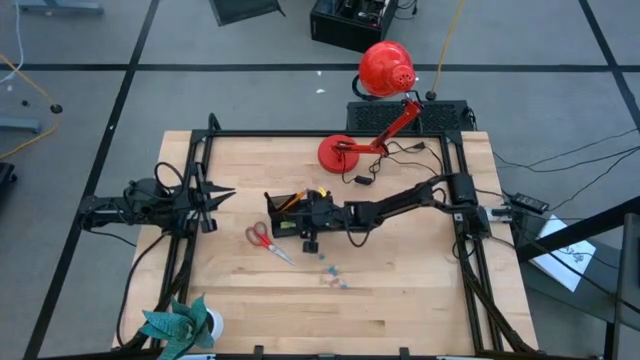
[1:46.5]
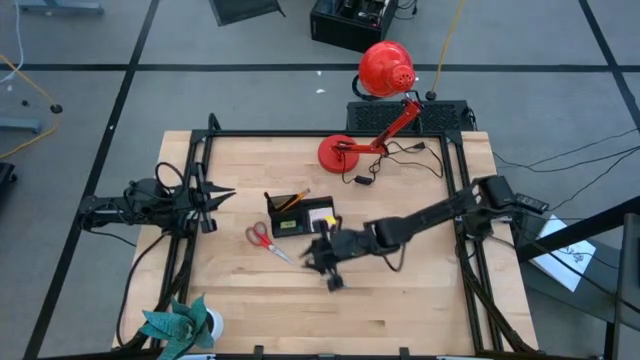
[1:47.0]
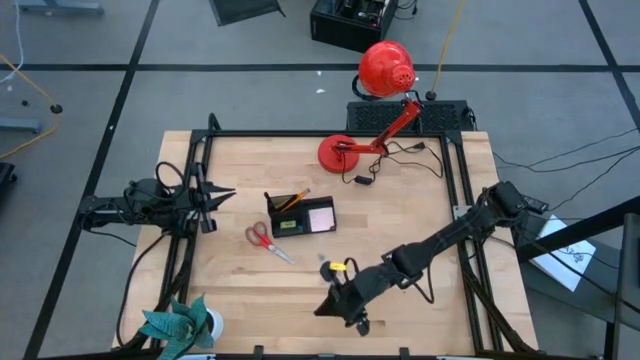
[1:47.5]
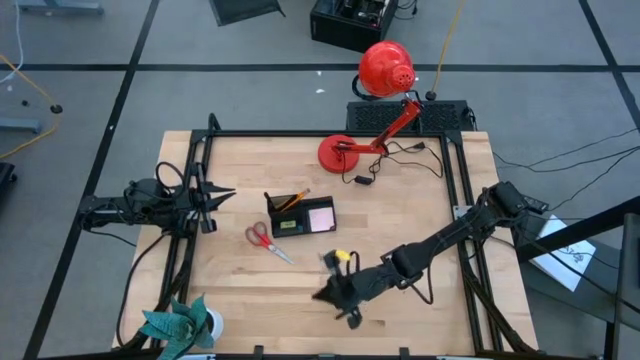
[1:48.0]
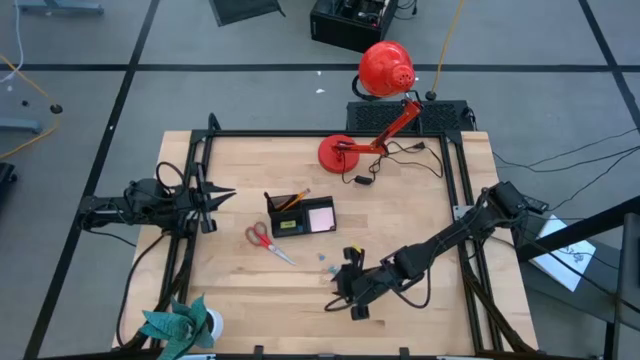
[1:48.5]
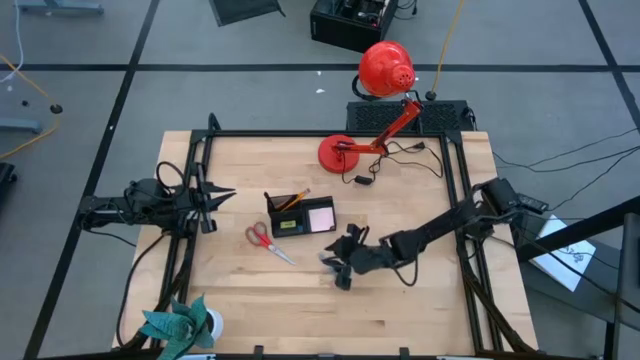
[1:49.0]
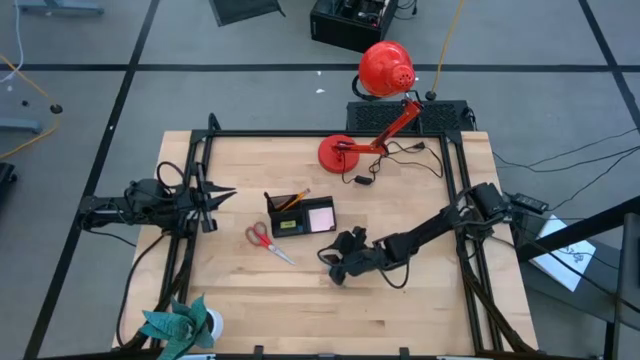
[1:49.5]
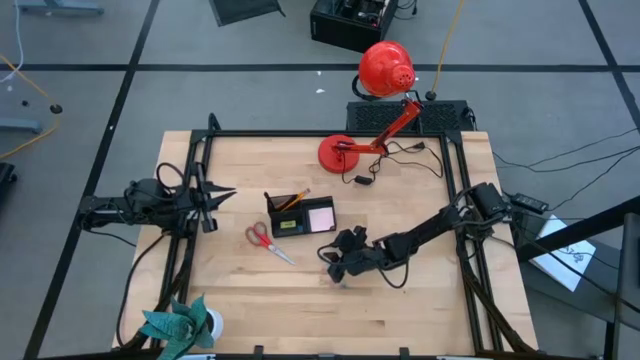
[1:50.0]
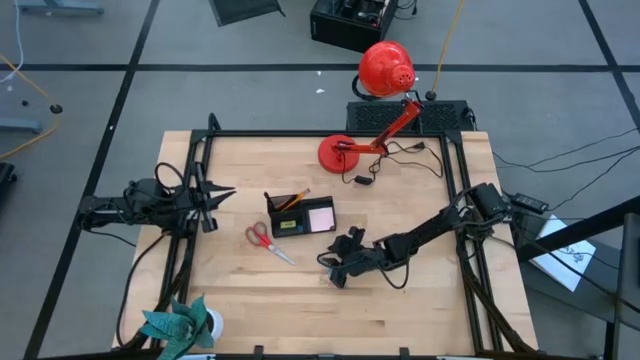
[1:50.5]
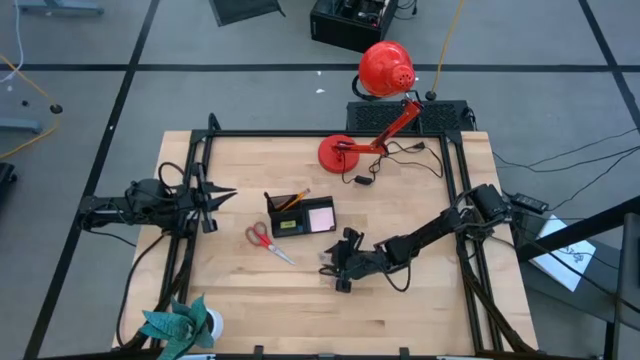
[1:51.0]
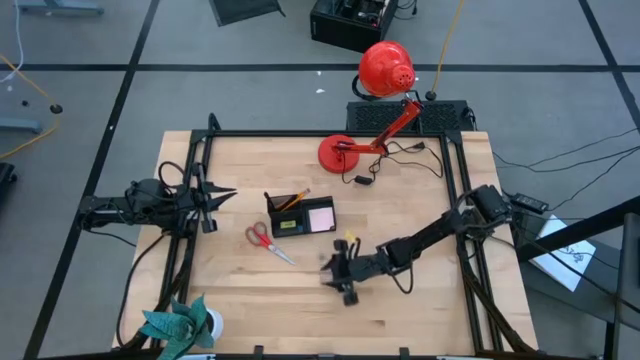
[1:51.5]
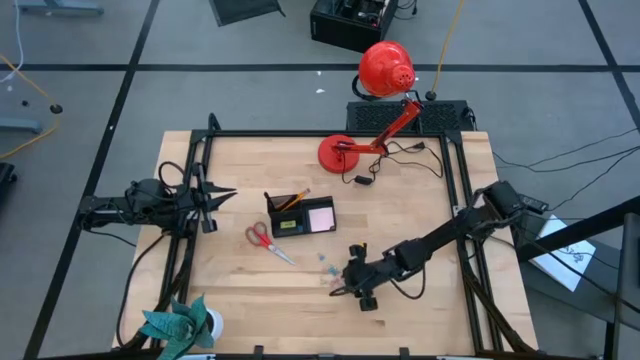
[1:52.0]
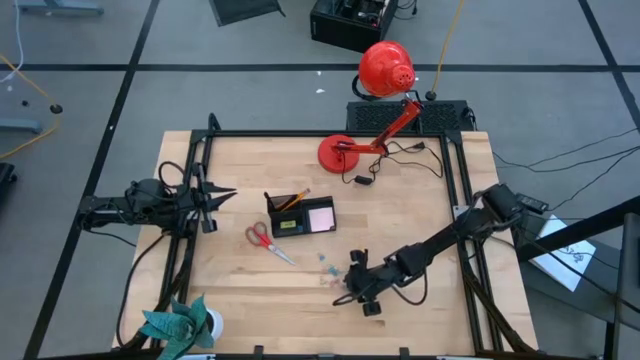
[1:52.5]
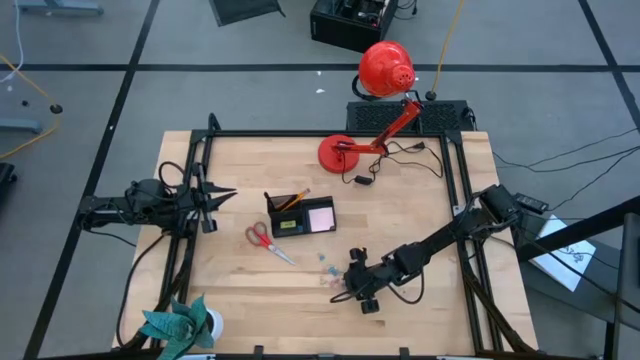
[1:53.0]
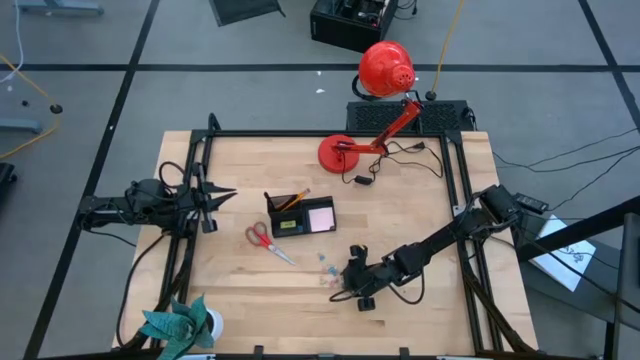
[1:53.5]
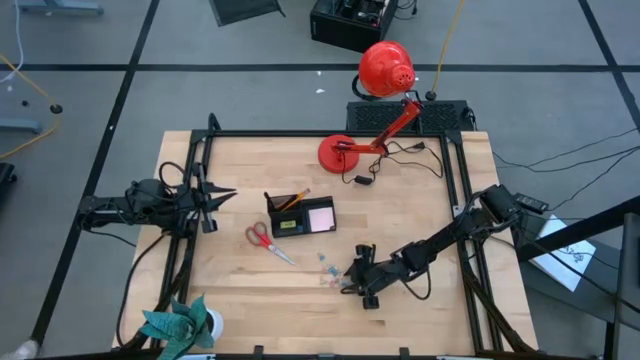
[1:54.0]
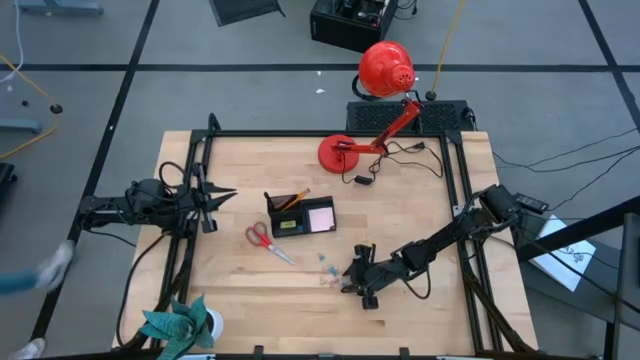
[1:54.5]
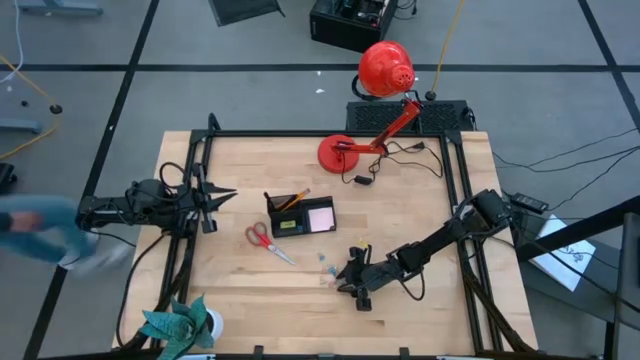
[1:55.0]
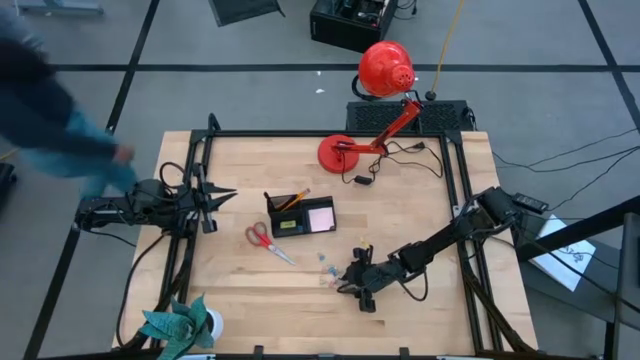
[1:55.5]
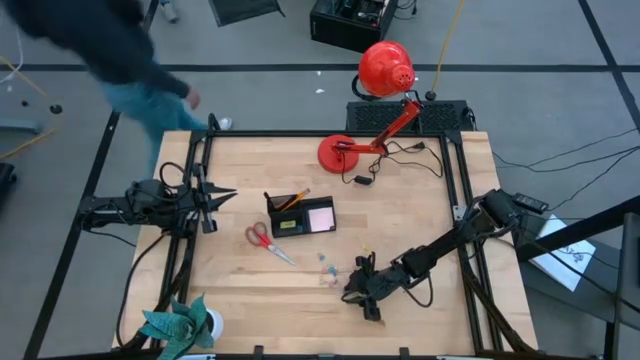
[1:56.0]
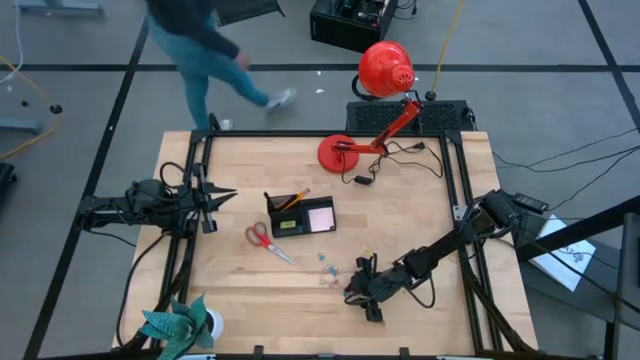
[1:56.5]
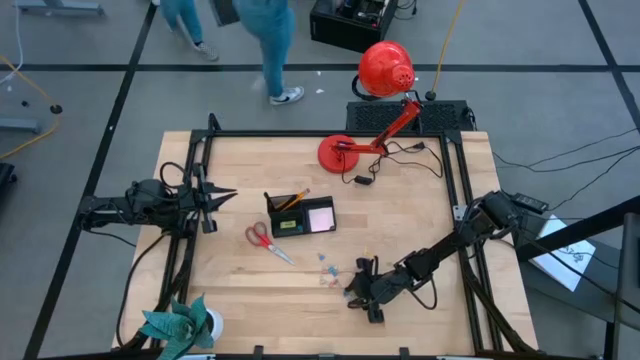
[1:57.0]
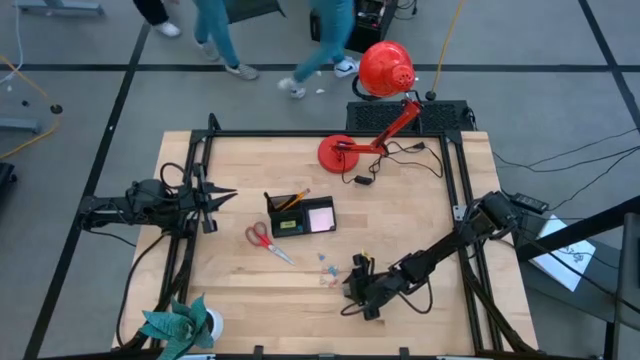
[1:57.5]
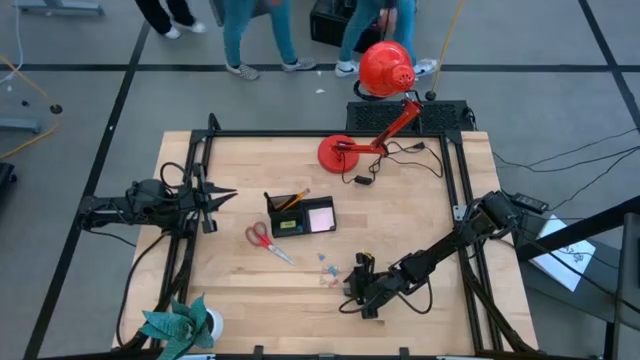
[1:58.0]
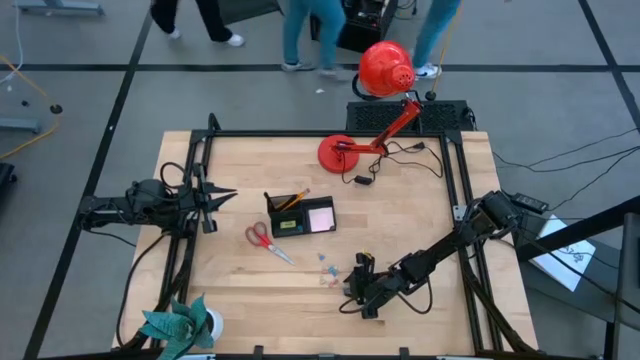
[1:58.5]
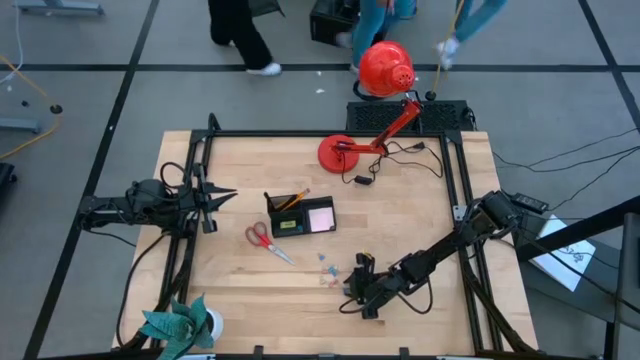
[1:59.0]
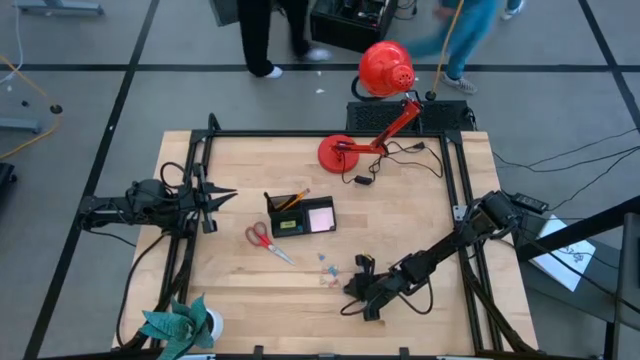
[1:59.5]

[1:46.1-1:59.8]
Task: Pick and place office supplies into organizer
Put the blue binder clip into the mesh desk organizer

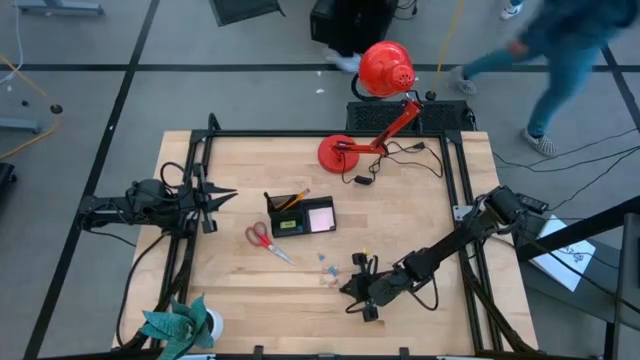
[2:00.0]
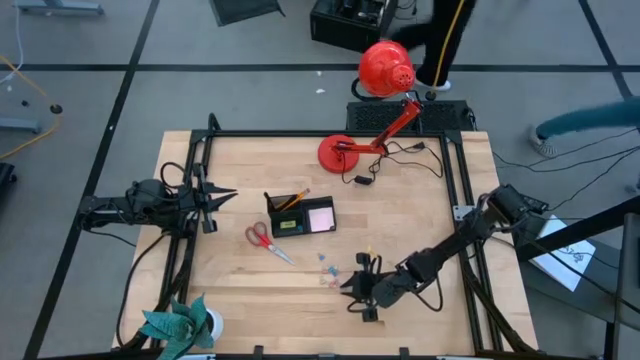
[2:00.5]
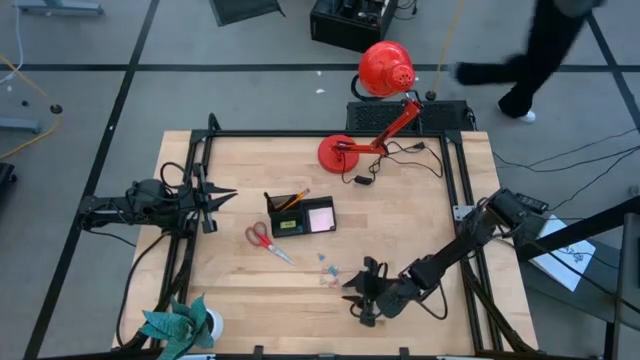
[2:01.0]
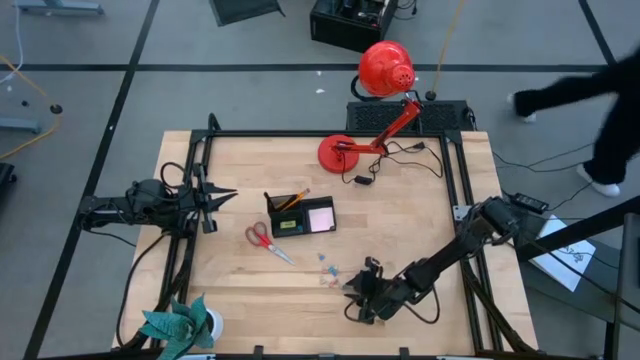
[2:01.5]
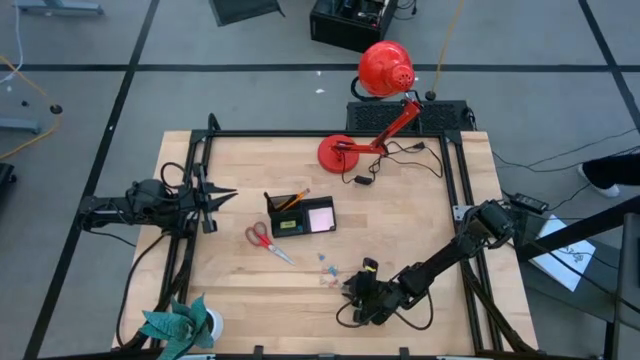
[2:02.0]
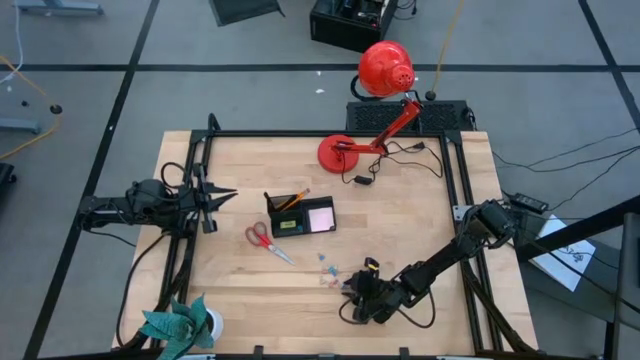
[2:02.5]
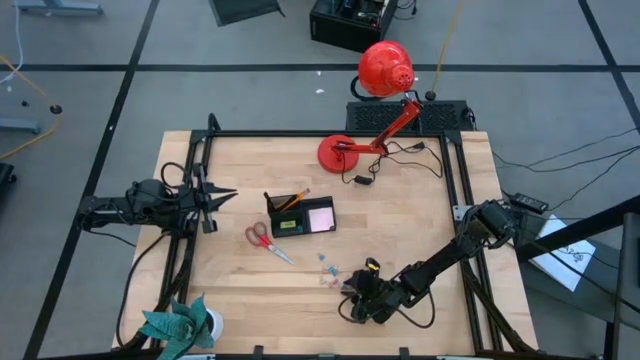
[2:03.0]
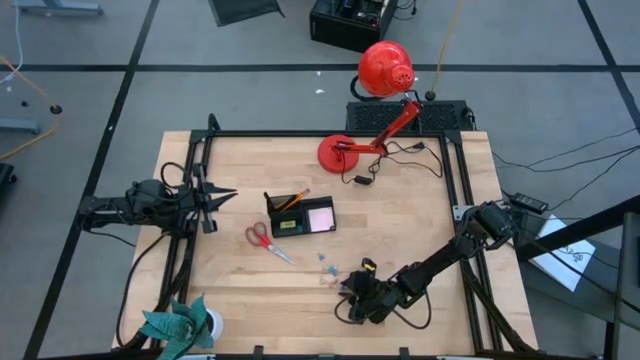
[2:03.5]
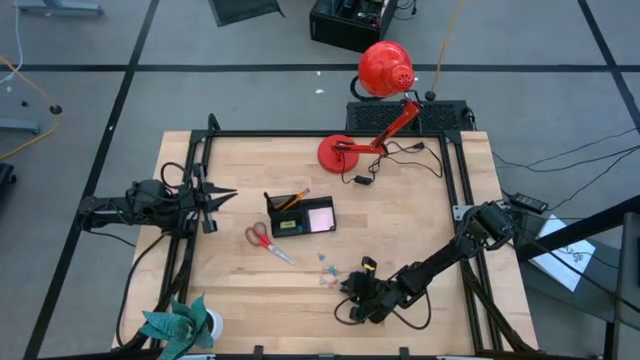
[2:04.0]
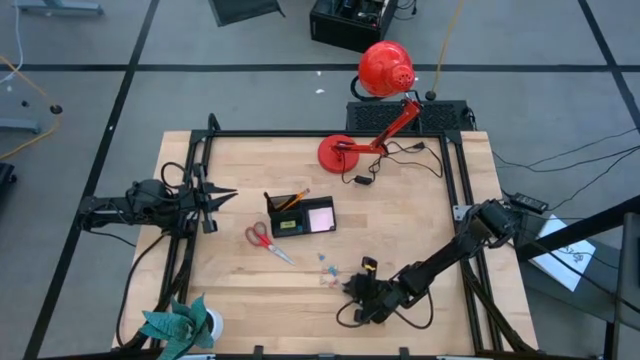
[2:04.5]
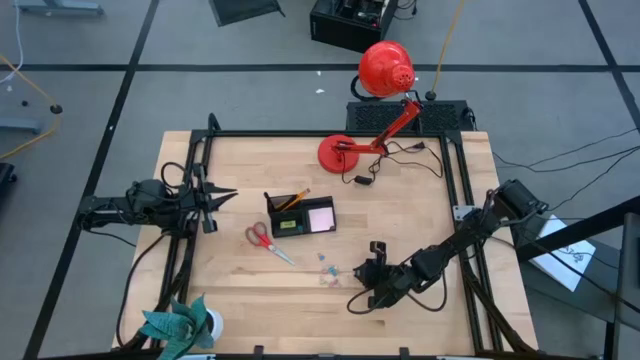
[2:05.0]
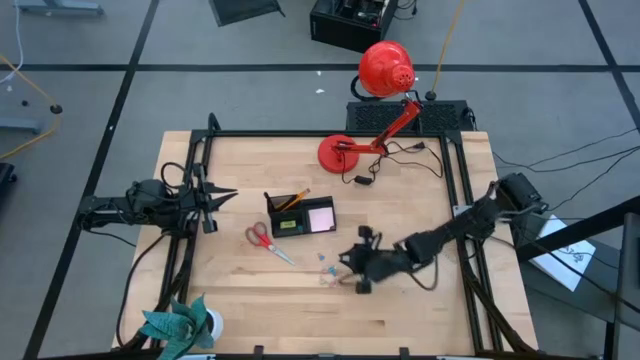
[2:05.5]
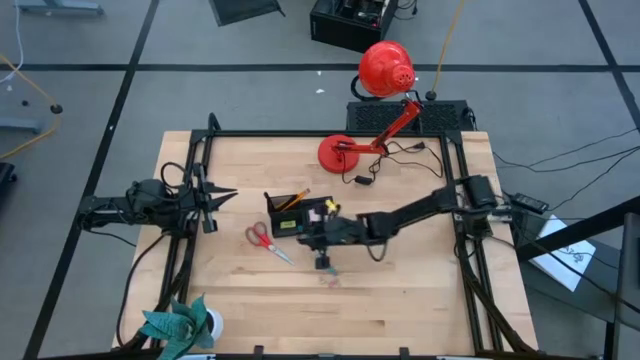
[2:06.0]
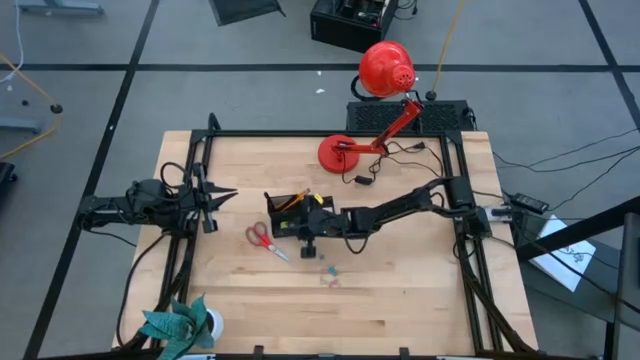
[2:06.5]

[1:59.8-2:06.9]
Put the blue binder clip into the mesh desk organizer

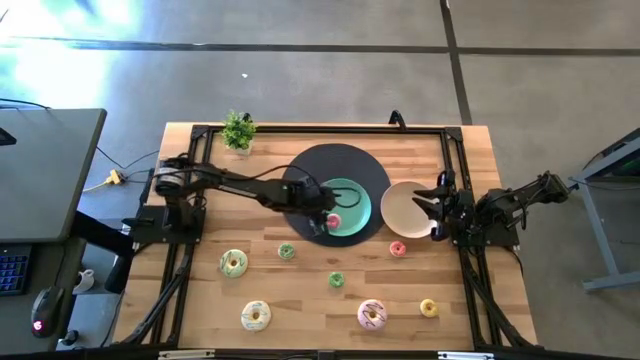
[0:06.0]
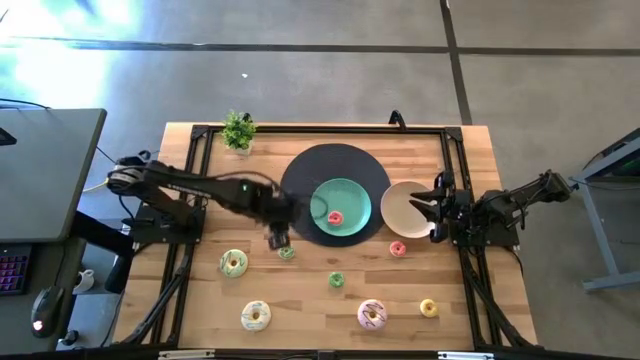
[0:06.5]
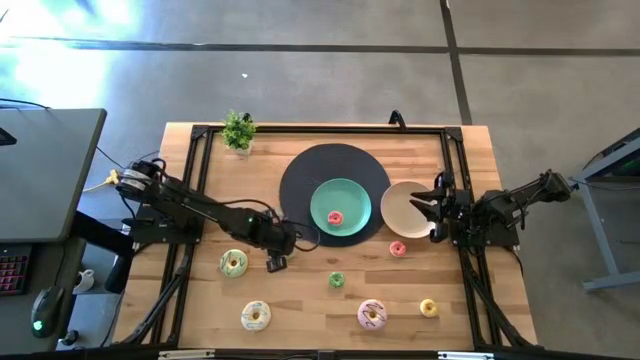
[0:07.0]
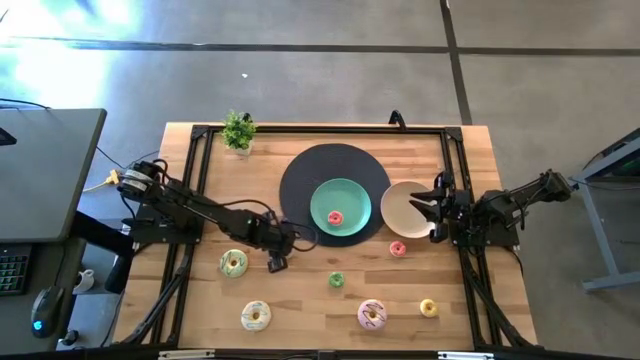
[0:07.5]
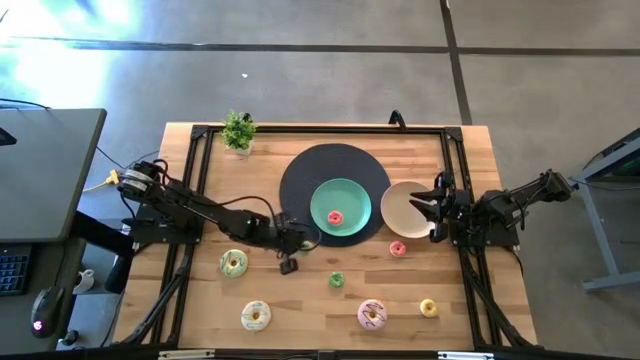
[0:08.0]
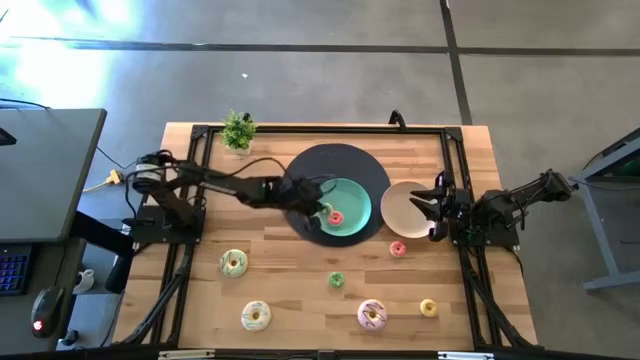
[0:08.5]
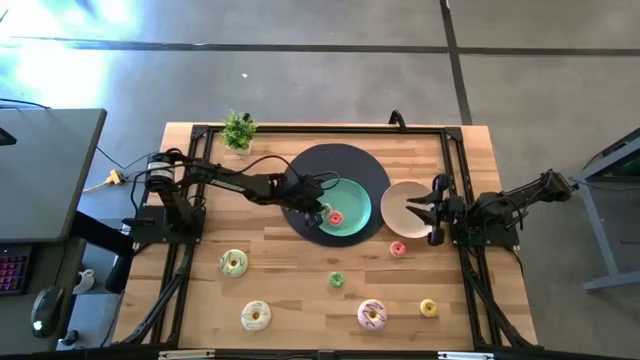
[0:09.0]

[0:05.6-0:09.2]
Task: Pick & Place donuts
Put the small green donut into the blue plate
